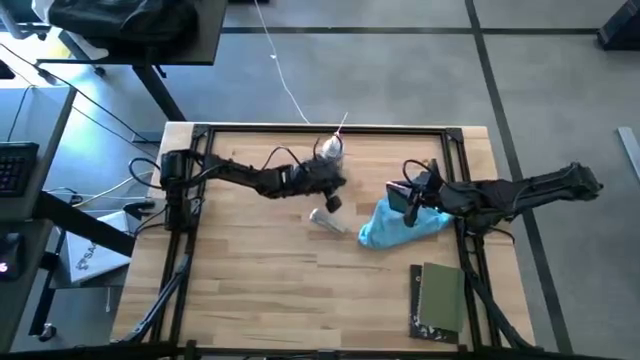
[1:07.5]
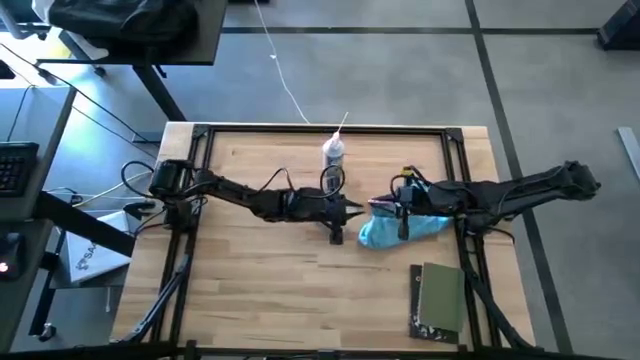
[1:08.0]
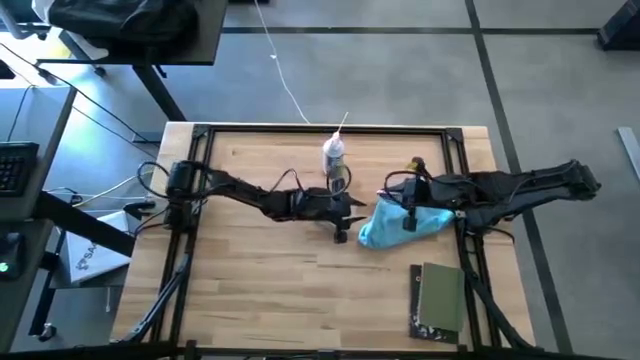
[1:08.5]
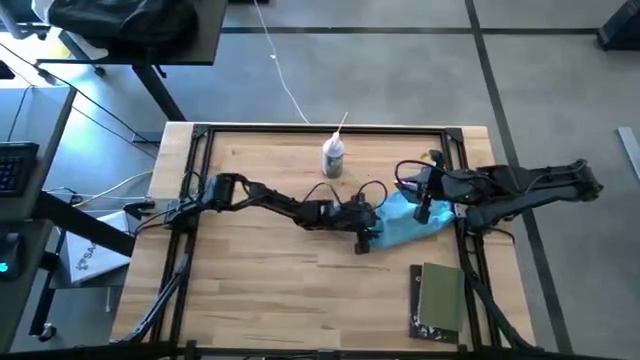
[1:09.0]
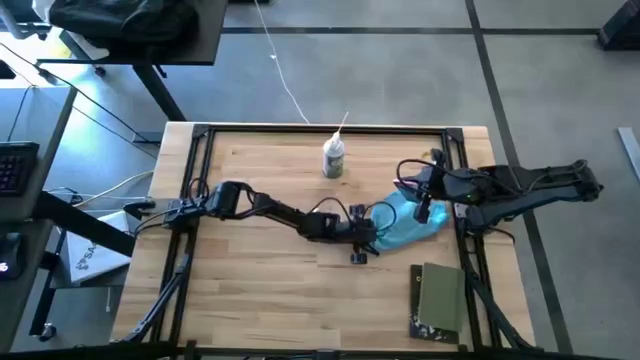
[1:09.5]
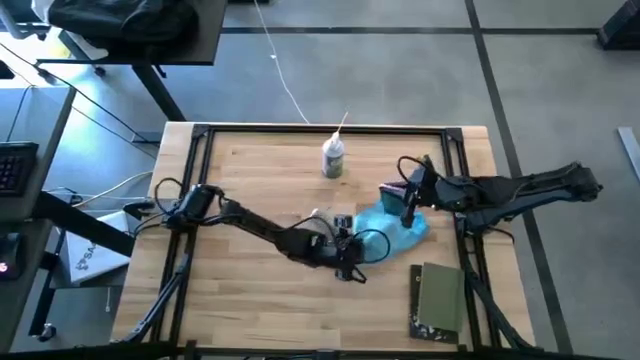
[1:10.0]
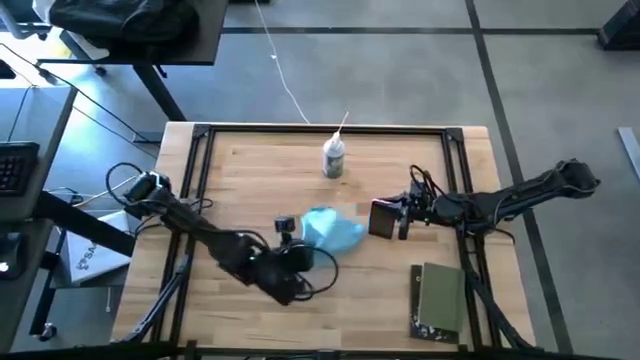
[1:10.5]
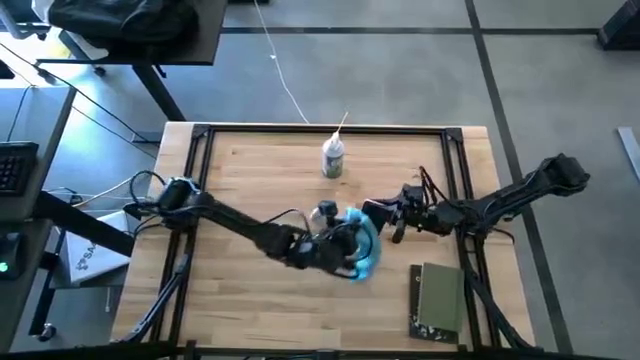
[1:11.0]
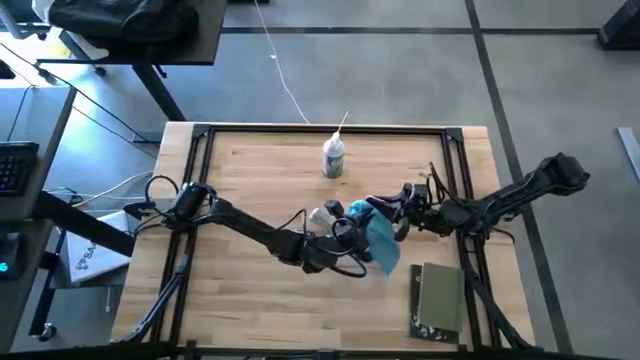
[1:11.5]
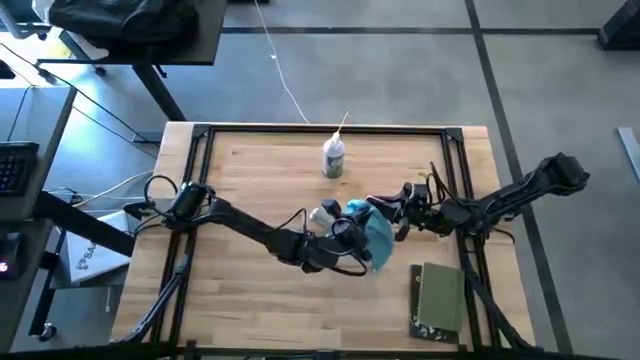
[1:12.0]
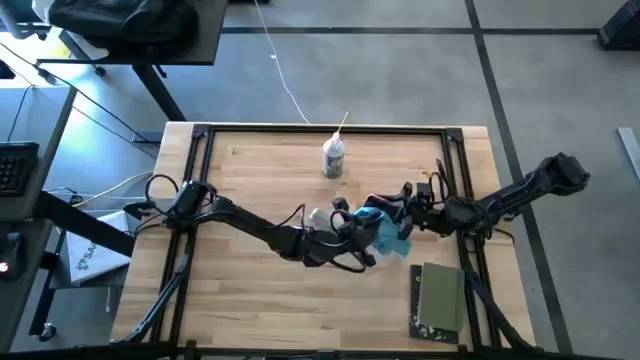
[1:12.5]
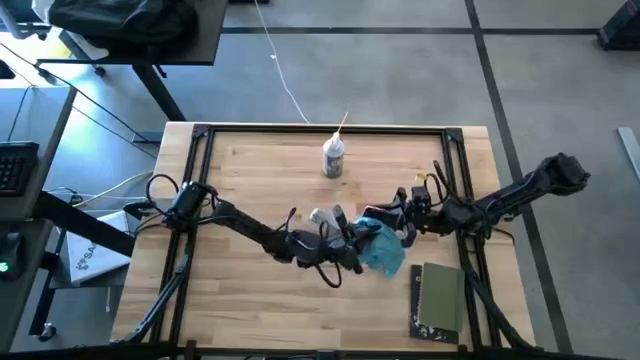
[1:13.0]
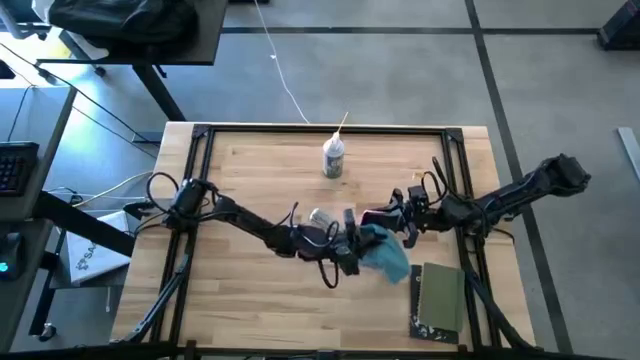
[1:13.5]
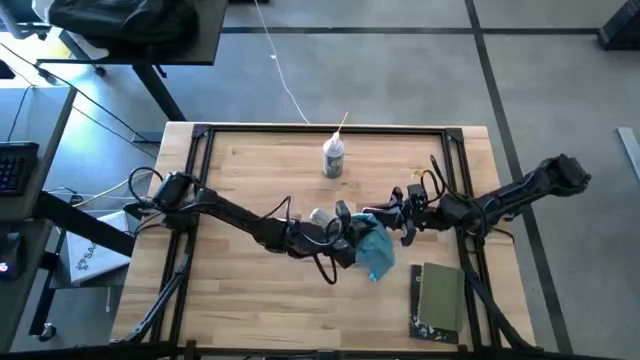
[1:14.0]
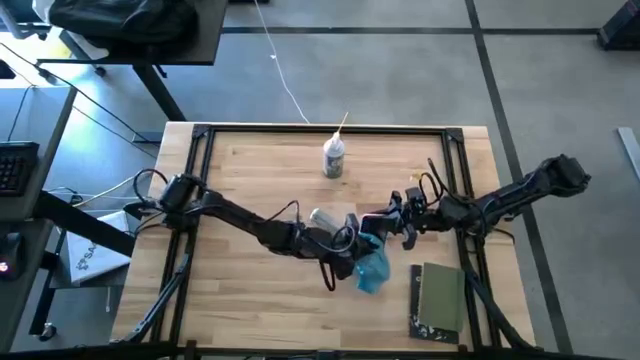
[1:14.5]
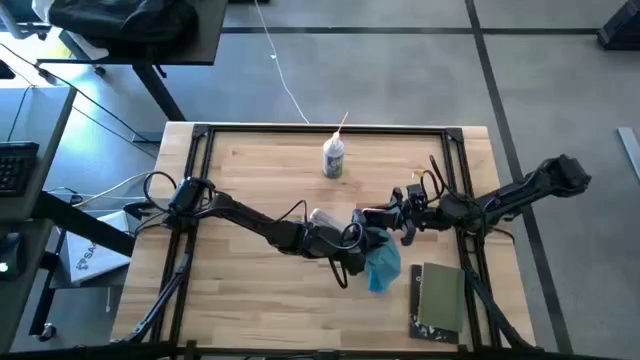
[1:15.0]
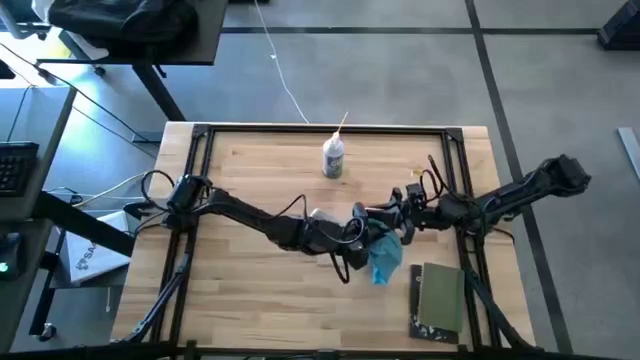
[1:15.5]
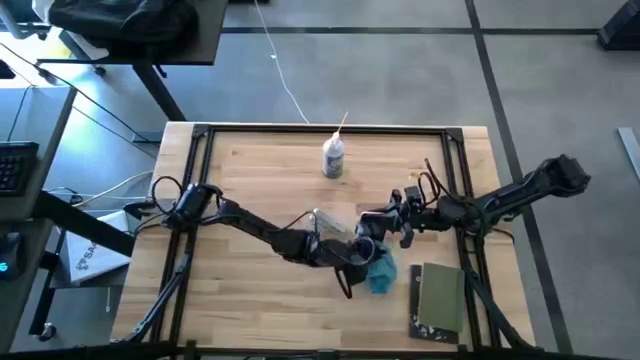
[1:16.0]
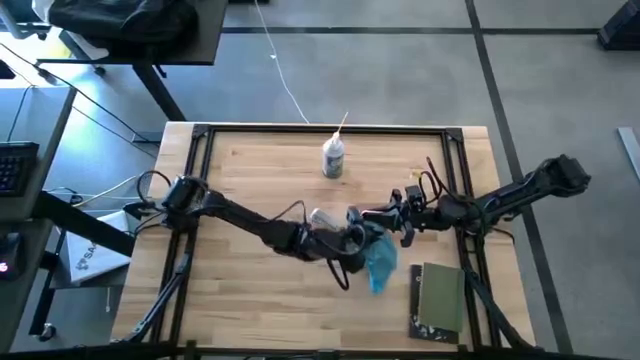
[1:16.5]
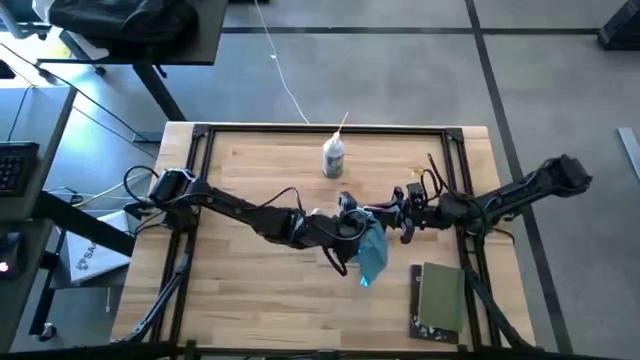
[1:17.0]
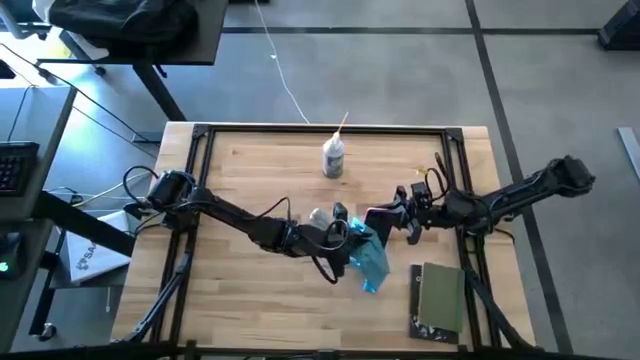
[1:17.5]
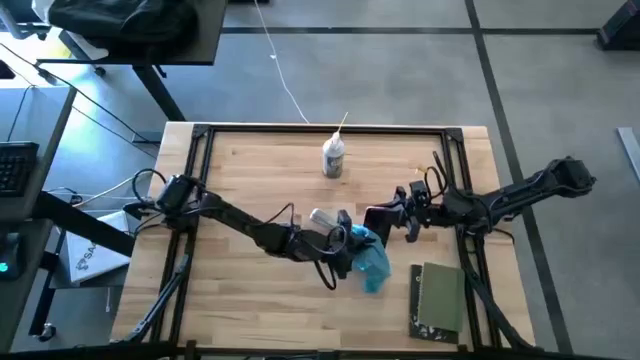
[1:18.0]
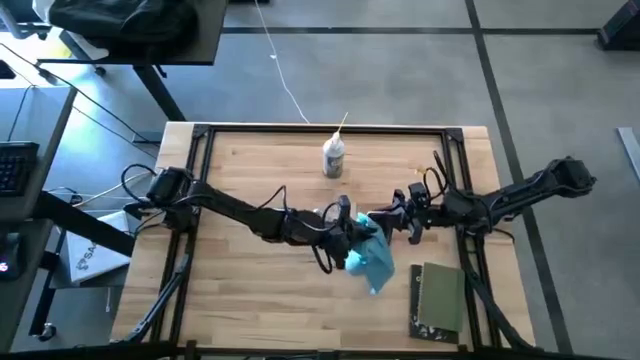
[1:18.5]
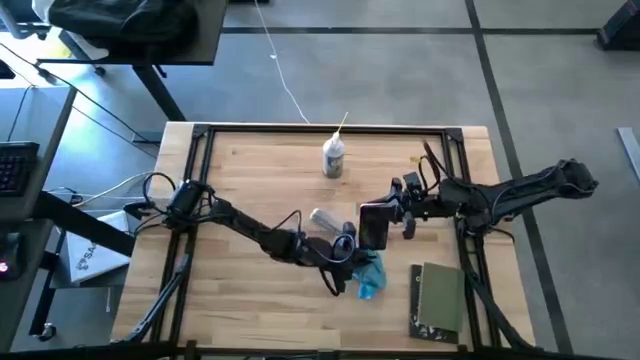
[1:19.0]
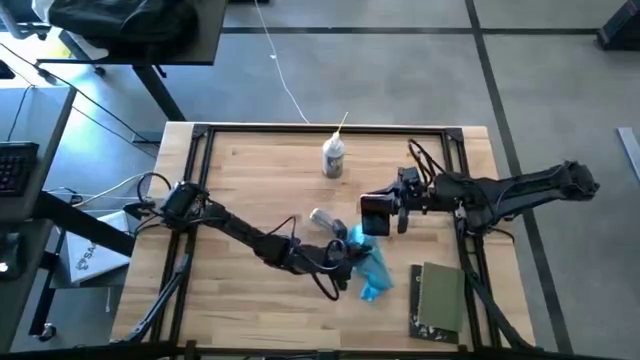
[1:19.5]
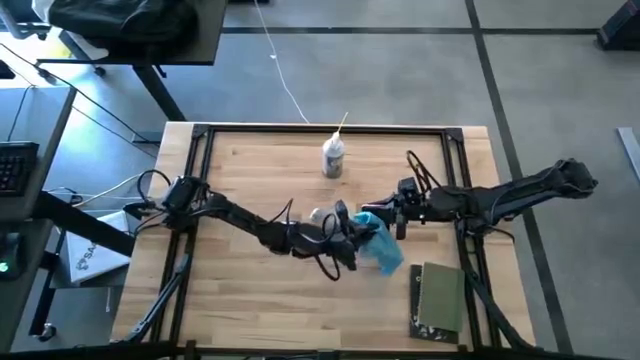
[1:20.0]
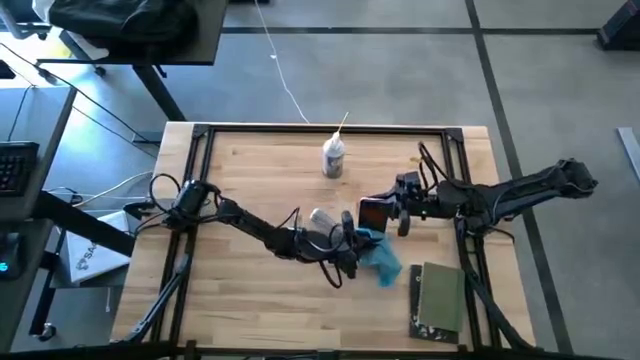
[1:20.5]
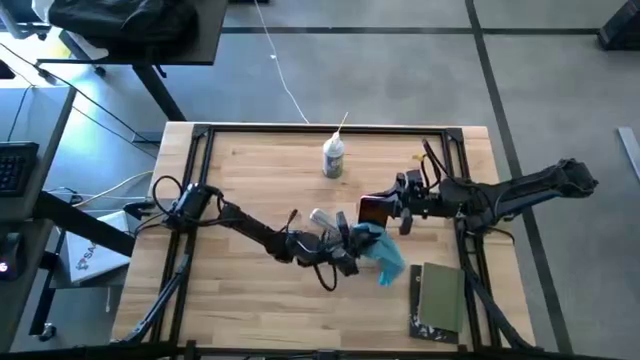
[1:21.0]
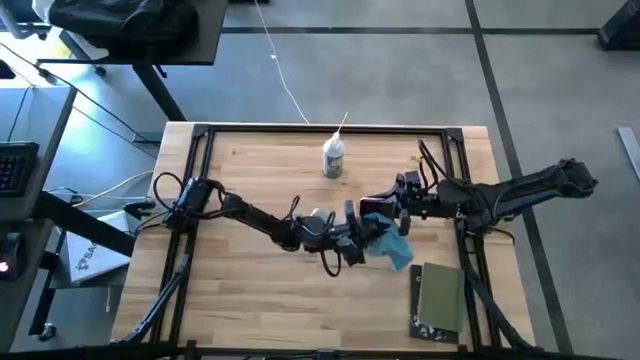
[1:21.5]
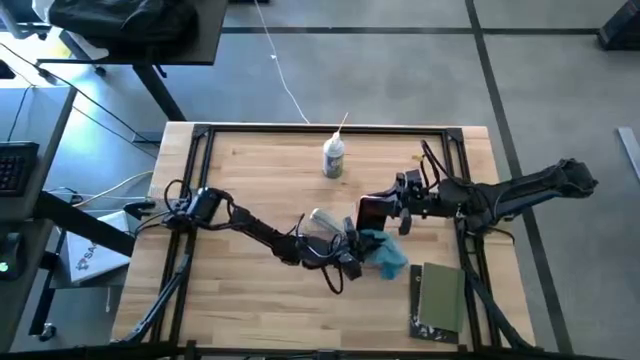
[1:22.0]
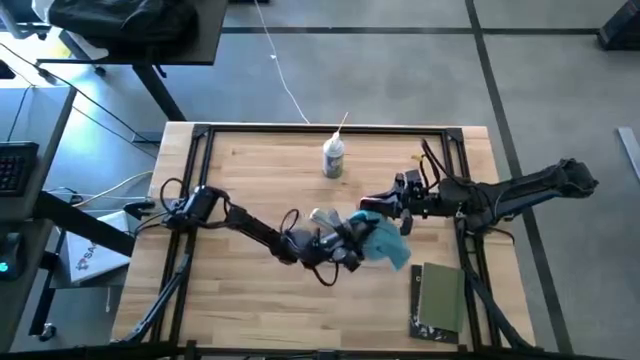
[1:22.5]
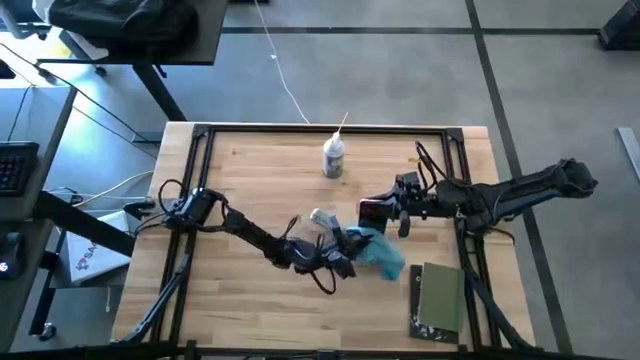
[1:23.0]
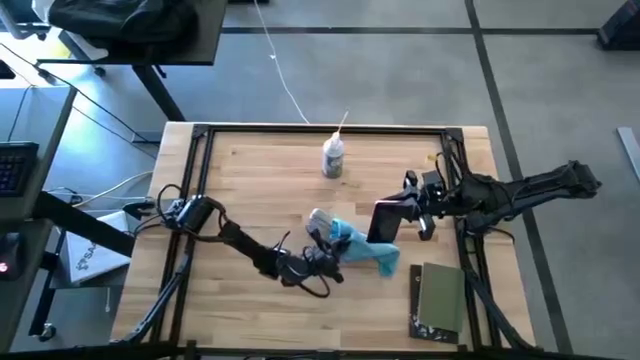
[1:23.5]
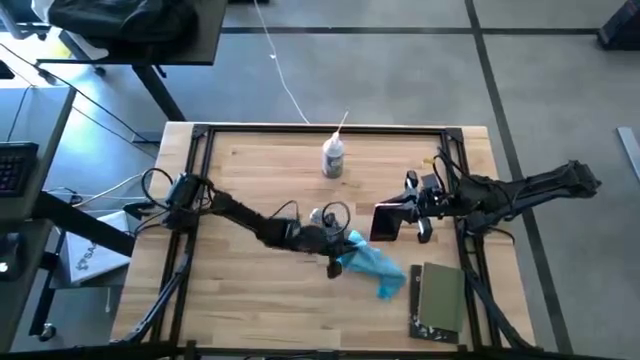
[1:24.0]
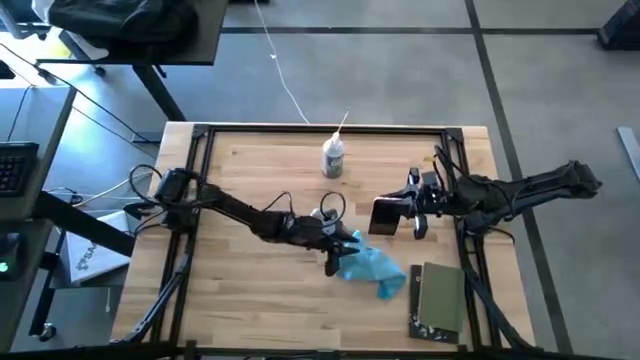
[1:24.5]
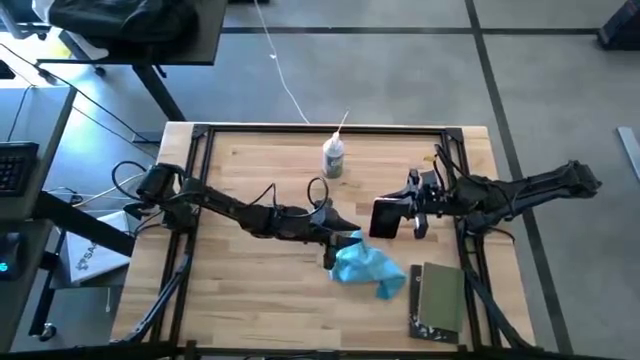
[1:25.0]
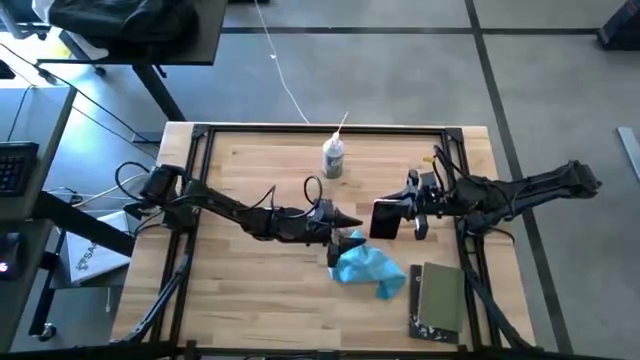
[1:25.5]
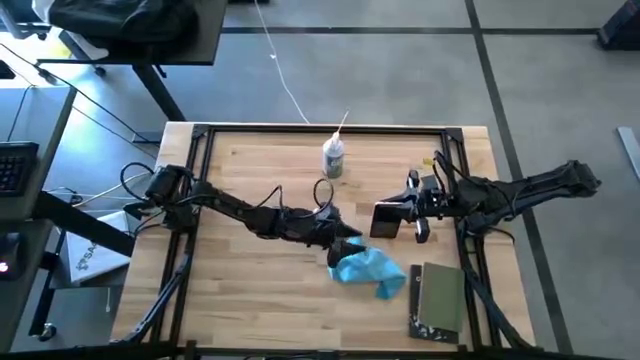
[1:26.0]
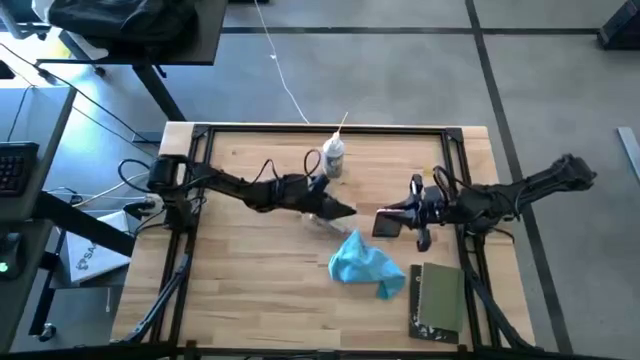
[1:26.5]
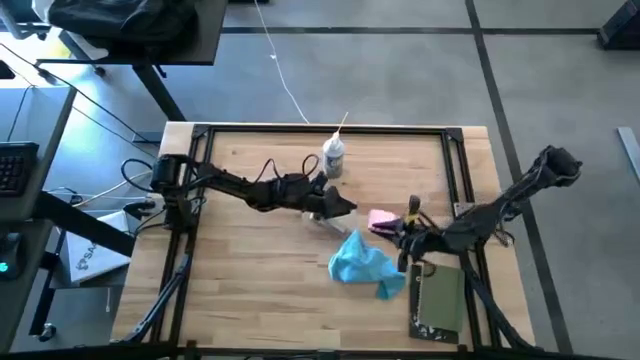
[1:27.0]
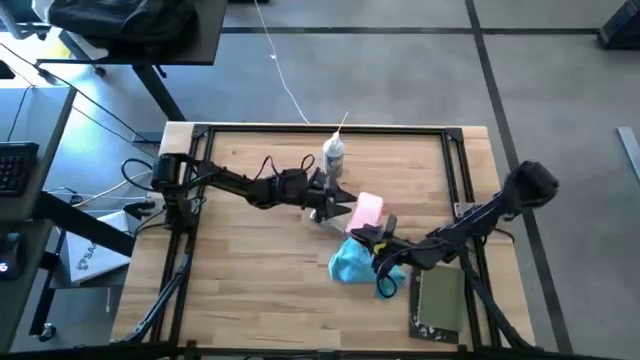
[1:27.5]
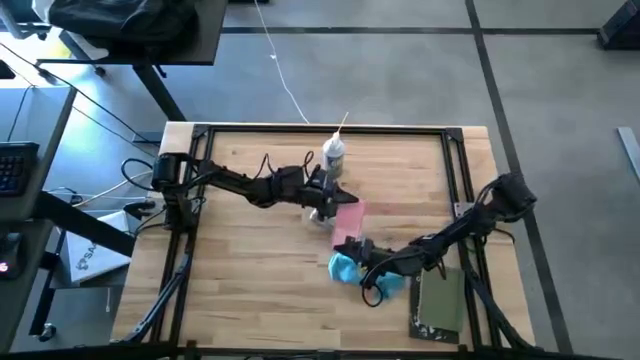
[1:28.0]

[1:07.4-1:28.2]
Task: Apply microfiber cloth
Wipe the pink phone with the blue microfiber cloth
